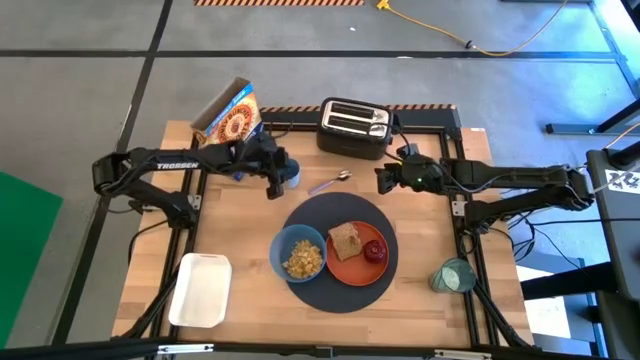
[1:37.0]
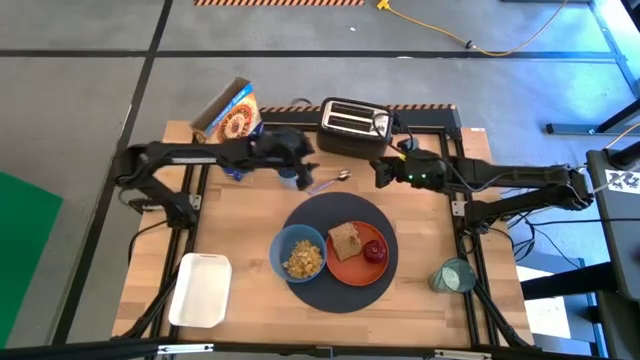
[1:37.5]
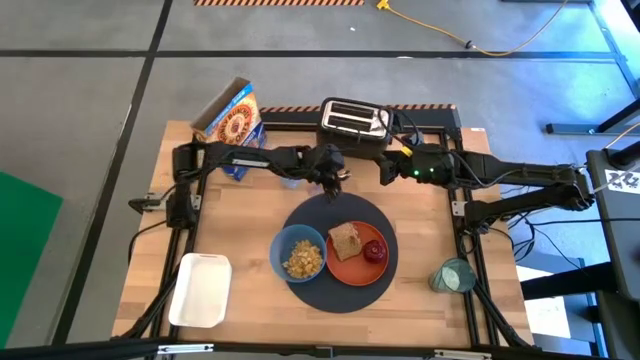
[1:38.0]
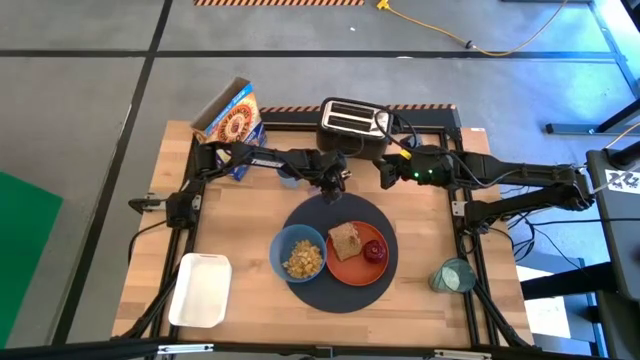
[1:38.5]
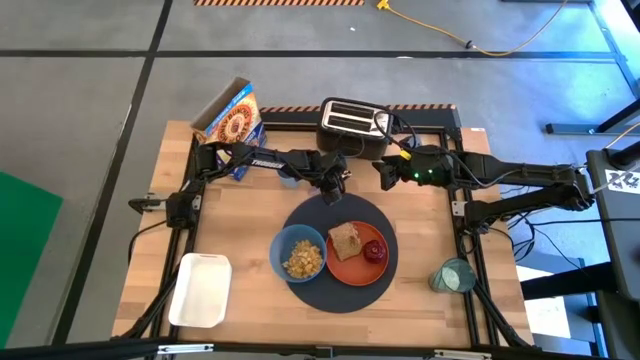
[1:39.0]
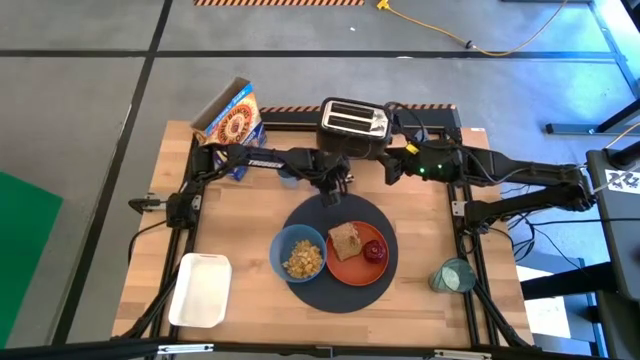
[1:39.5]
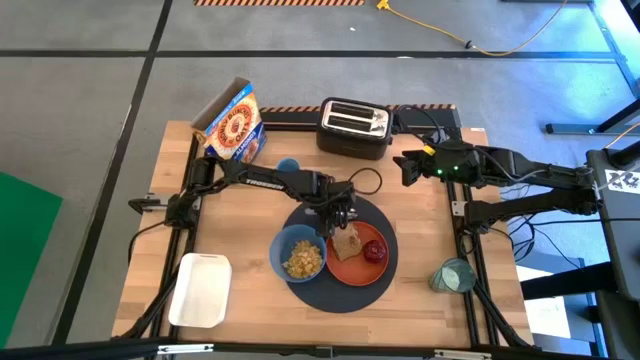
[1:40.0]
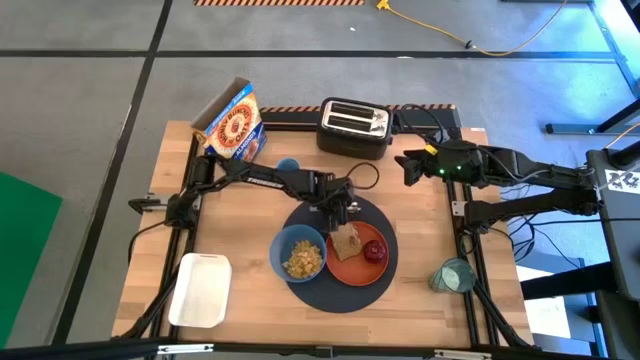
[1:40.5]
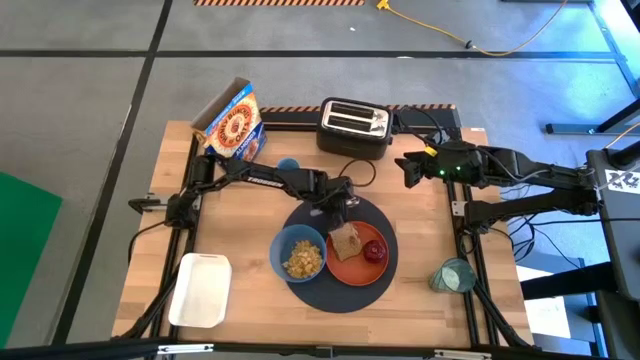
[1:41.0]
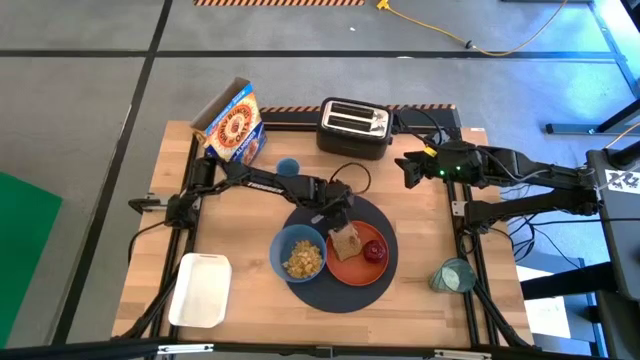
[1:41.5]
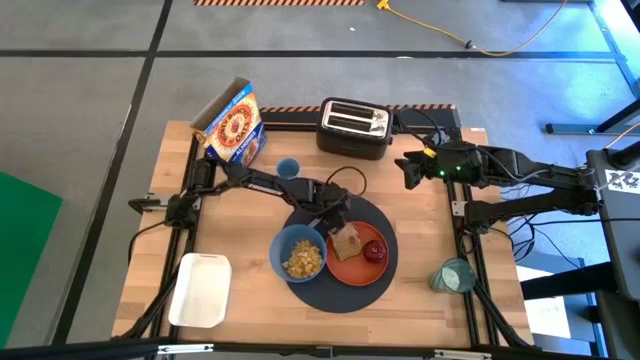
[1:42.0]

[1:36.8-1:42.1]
Task: Arrange a breakfast setting
Put the purple spoon on the black table mat to the top left of the orange plate

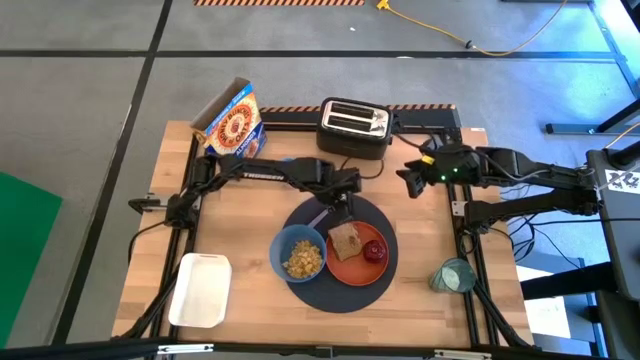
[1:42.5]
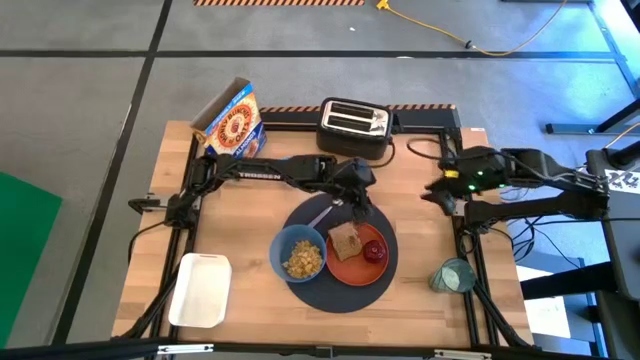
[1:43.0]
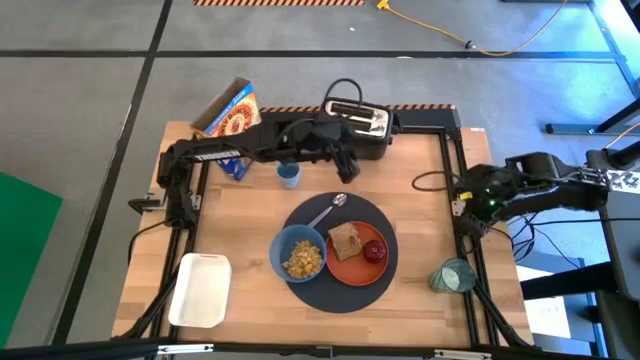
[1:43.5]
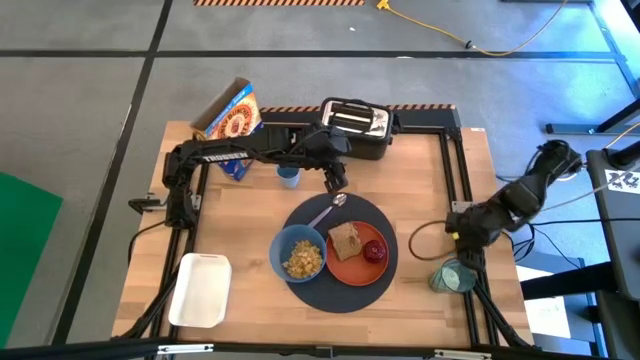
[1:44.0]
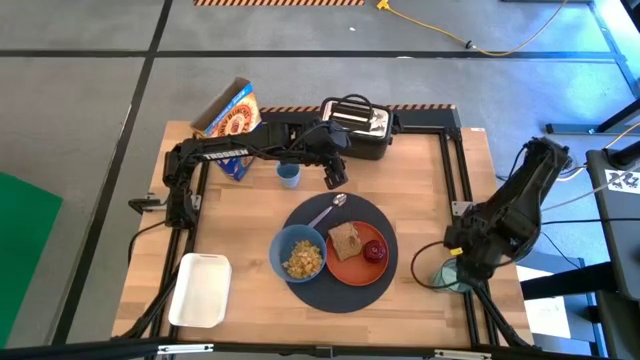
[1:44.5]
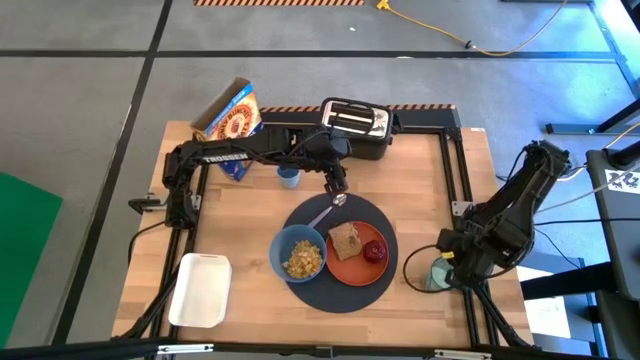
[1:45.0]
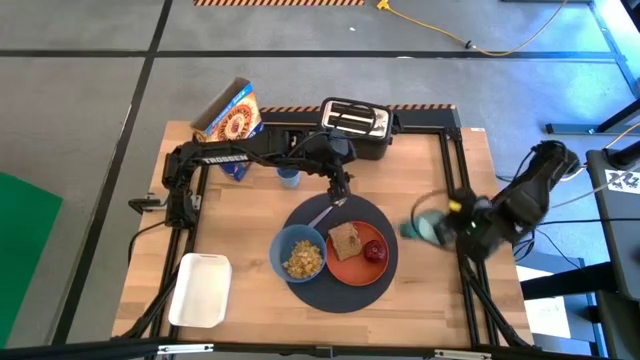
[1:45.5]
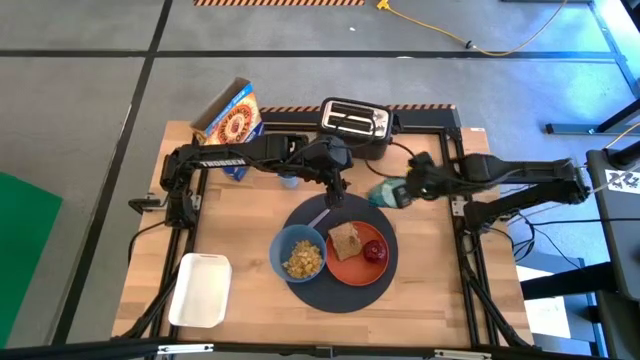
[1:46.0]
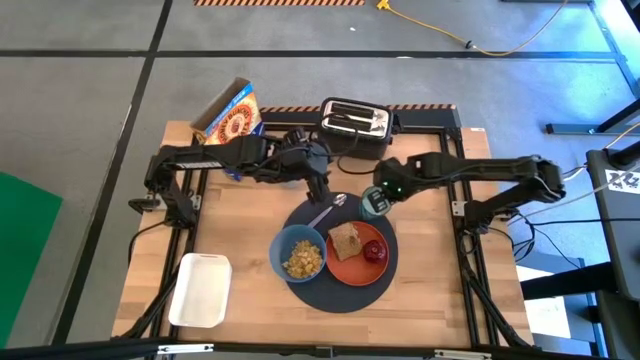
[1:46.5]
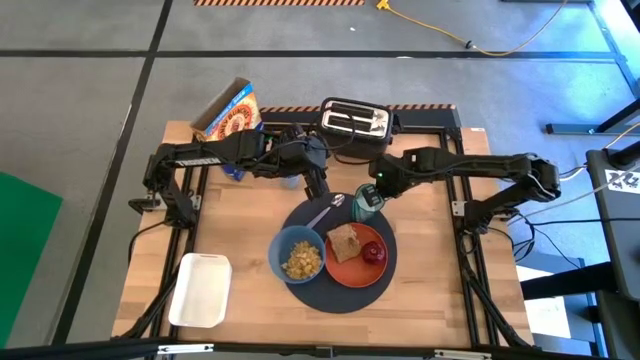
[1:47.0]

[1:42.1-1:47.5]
Put the blue glass on the black table mat to the top of the orange plate

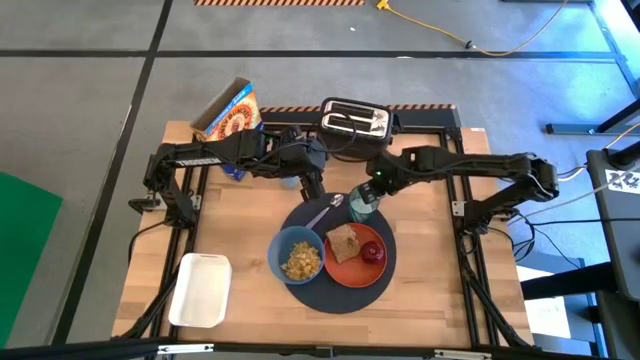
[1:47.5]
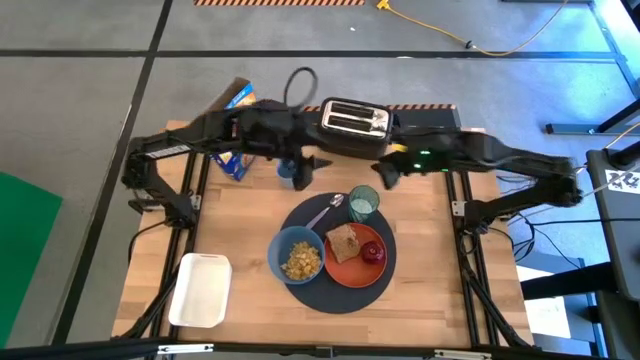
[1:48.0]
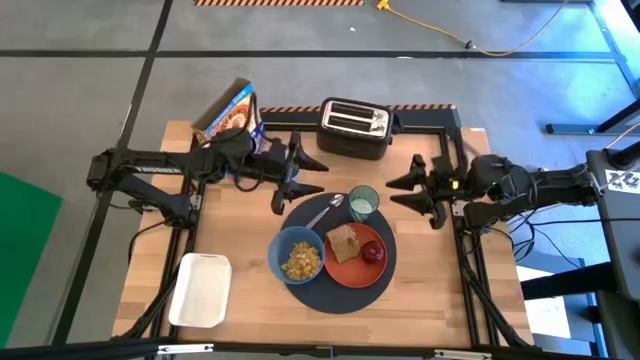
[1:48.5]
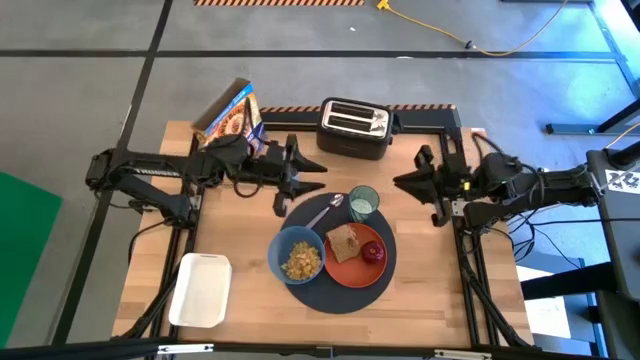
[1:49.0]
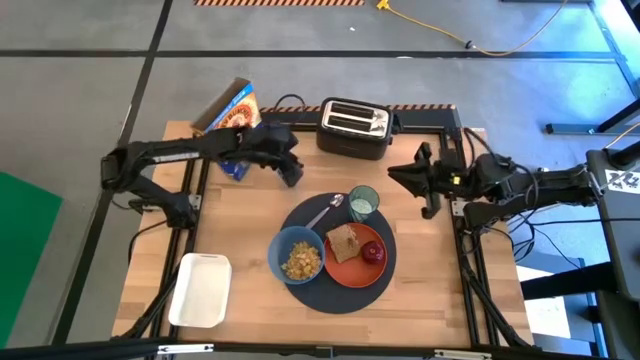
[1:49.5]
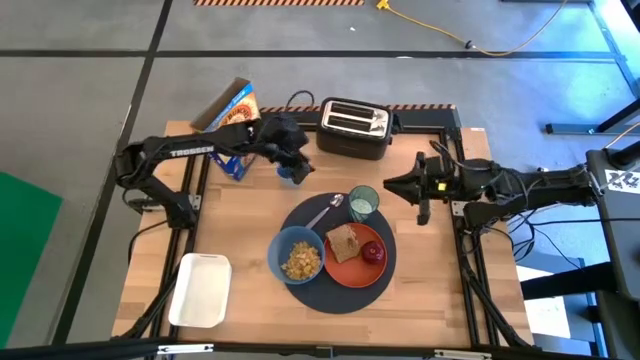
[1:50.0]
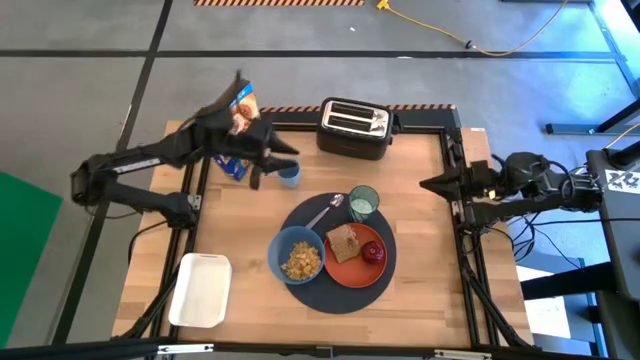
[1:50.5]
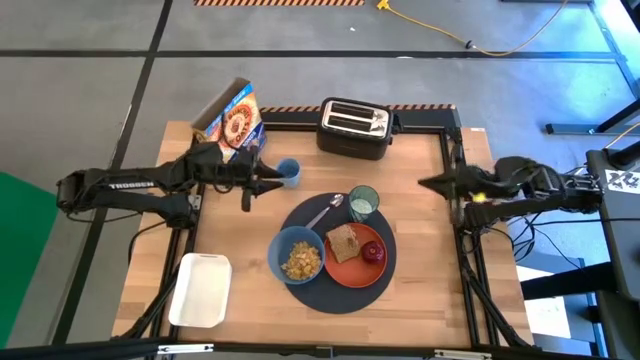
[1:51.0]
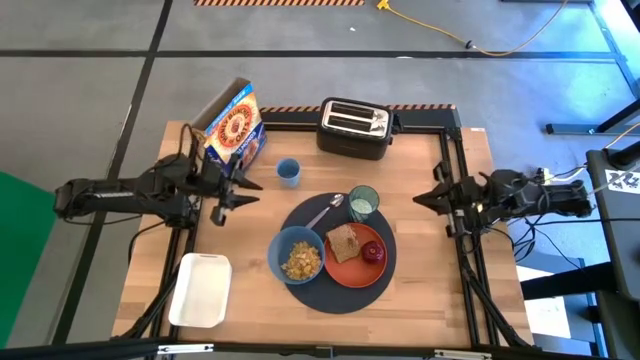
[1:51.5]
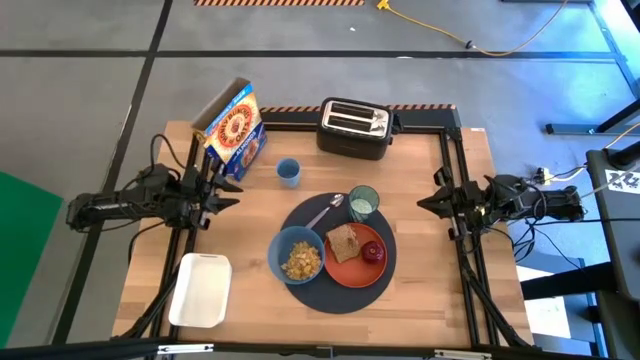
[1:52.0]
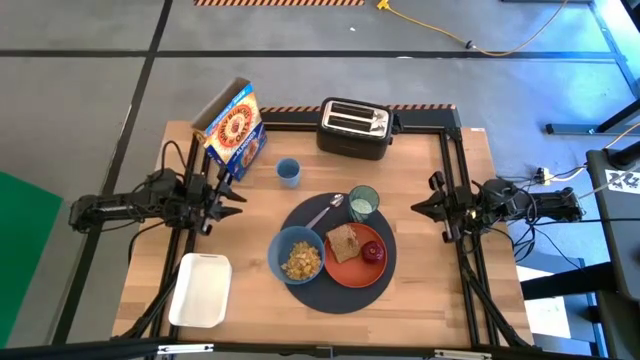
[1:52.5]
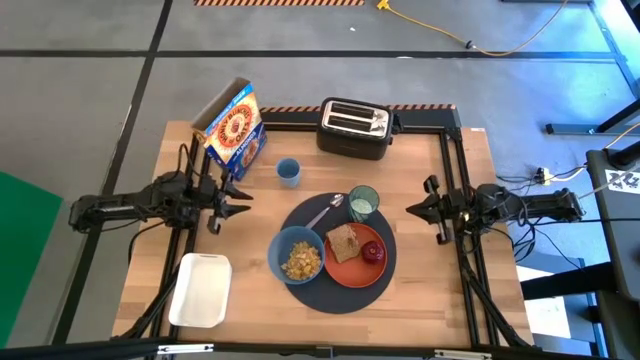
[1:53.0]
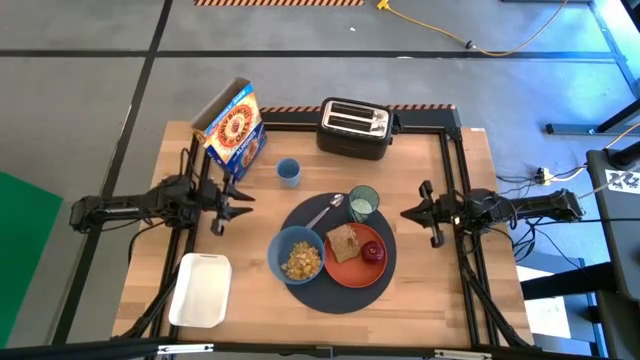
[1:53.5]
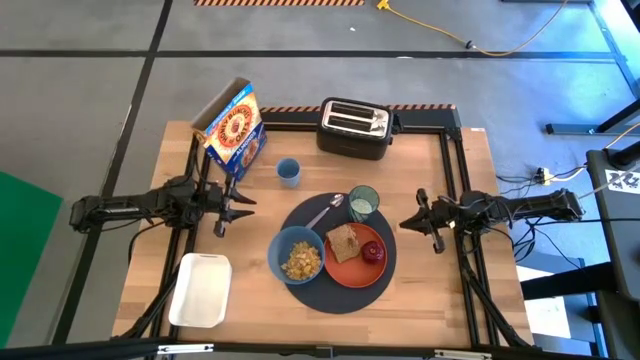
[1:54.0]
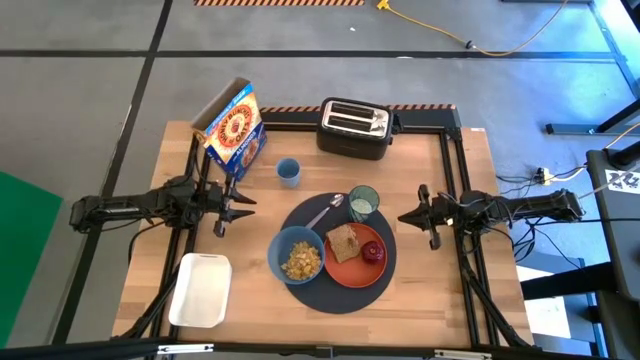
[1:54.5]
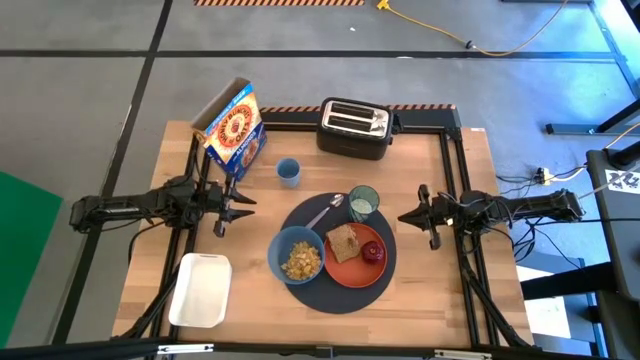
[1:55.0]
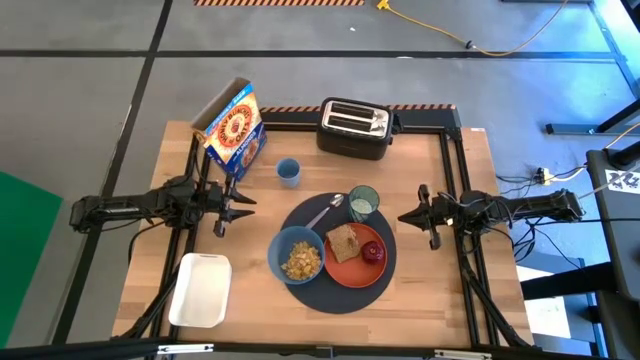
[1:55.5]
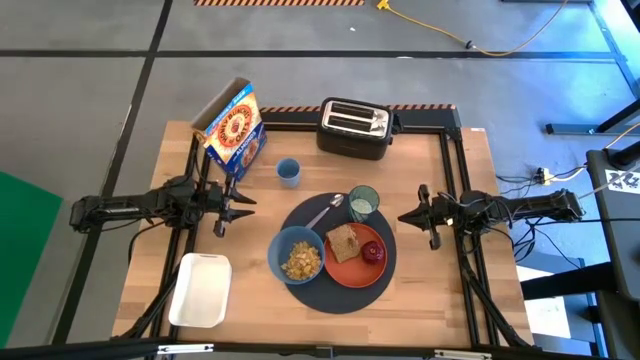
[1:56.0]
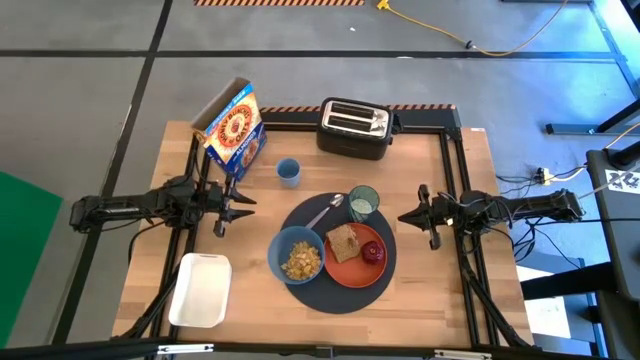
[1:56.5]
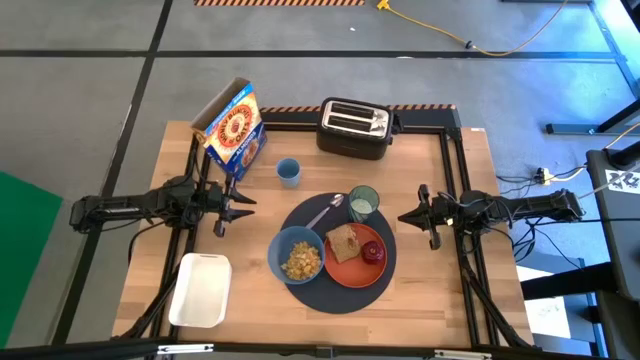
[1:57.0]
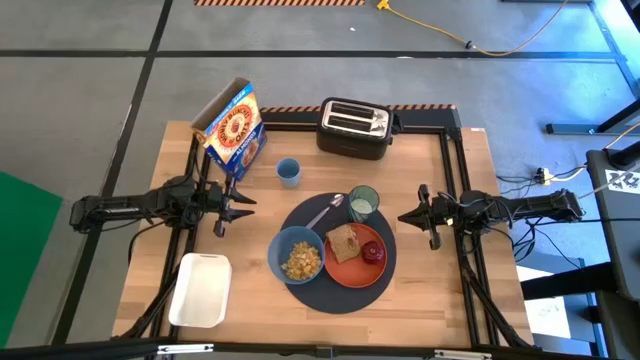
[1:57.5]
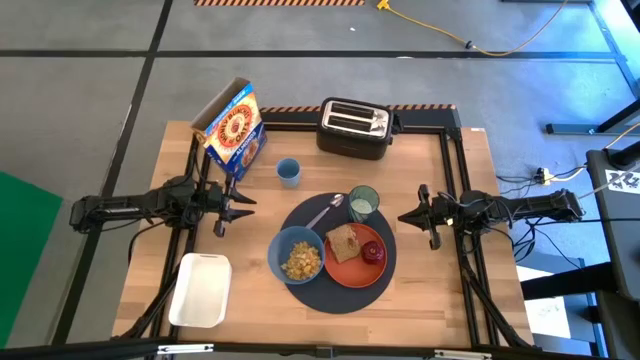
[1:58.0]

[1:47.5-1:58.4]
Return to Home Position
